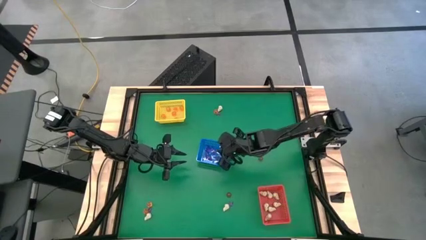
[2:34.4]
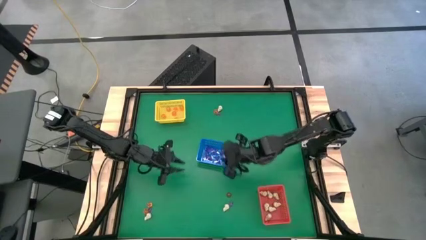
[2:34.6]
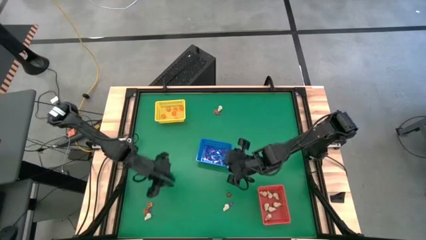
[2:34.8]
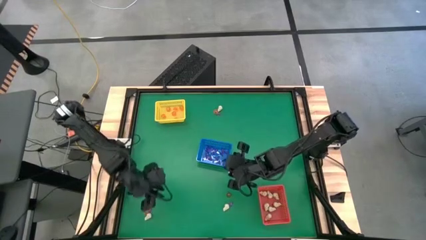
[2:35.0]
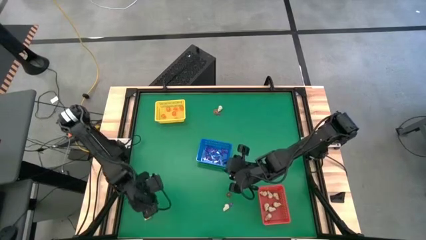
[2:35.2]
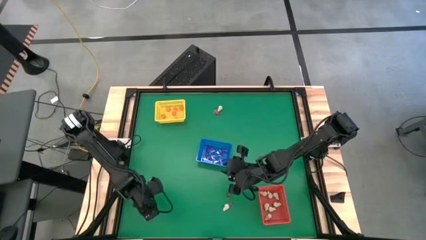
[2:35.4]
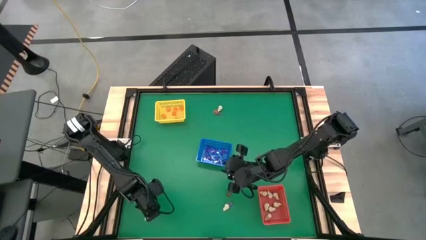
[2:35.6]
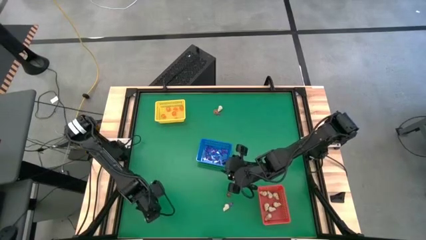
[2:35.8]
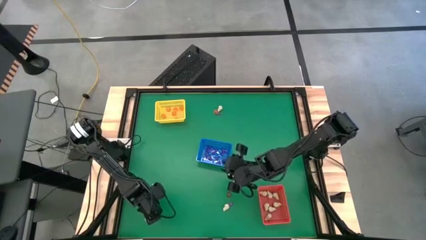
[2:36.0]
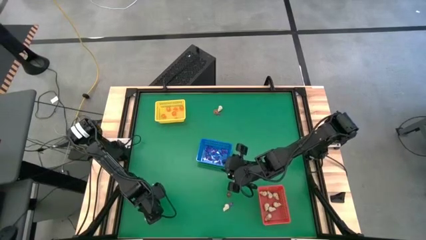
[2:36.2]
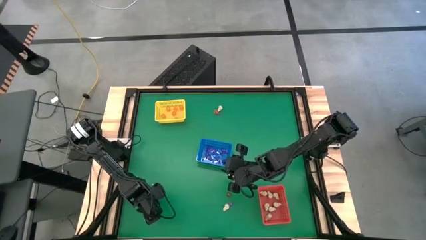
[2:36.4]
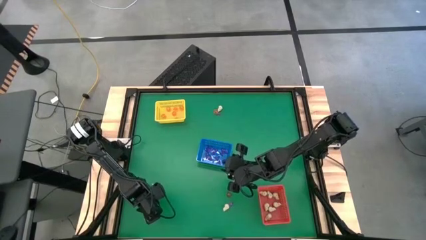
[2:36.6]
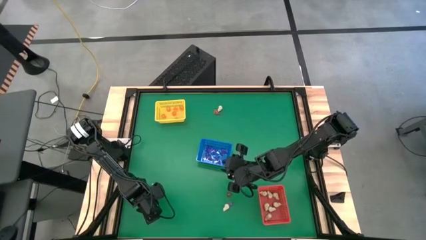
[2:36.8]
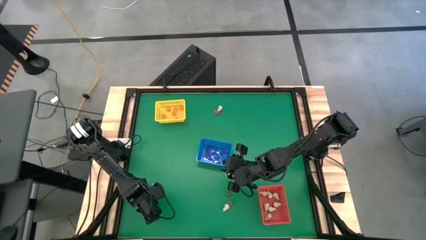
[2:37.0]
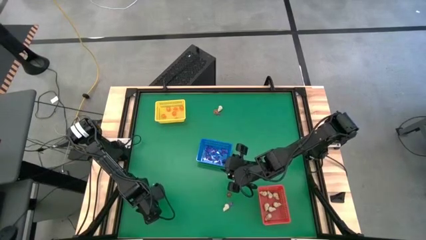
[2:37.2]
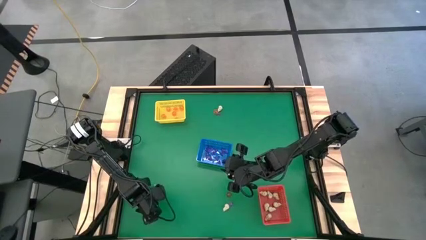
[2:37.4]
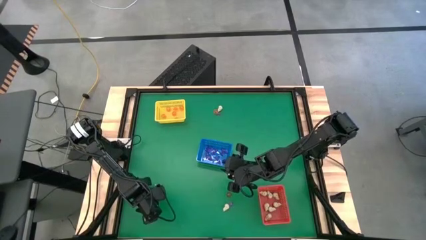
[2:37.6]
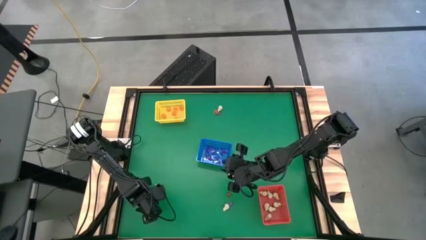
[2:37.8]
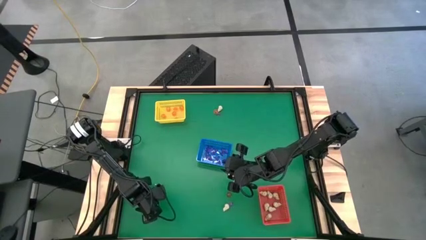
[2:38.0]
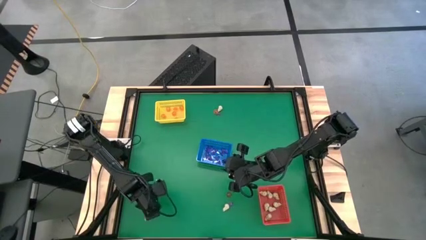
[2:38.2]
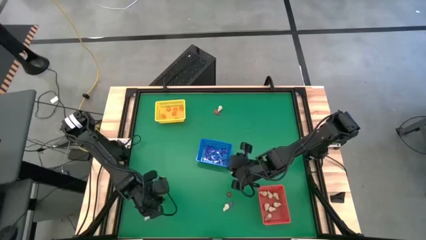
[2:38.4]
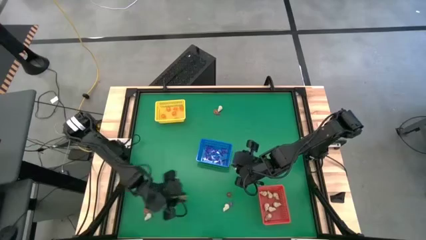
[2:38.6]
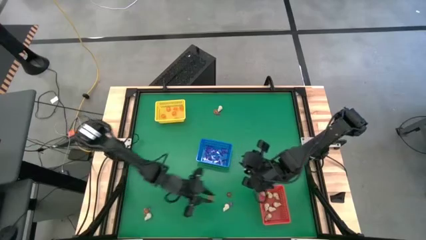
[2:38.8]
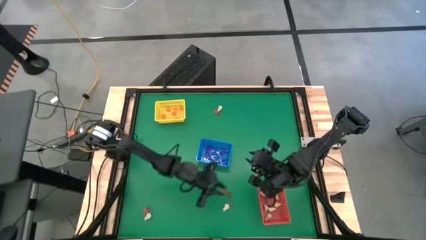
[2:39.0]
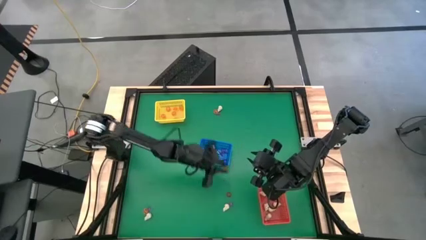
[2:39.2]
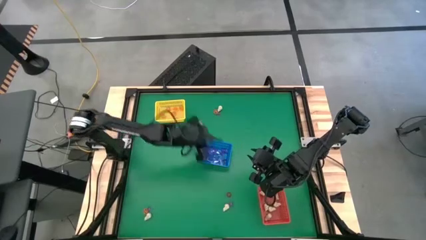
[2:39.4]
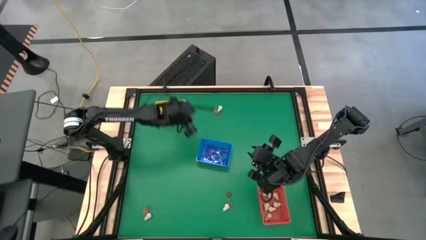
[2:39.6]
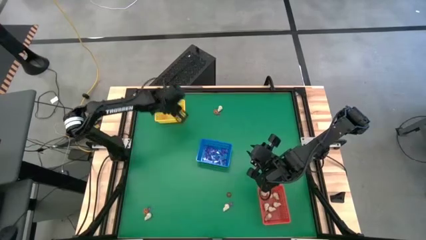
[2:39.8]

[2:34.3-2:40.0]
Task: Sort Halloween decoration
Put the pumpkin toy into the yellow bin

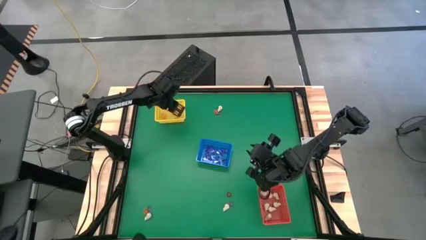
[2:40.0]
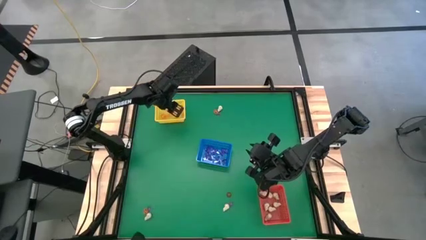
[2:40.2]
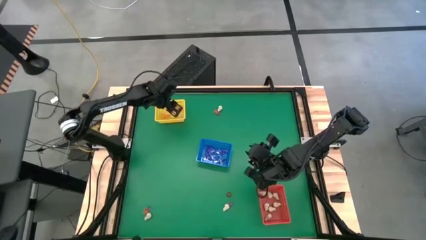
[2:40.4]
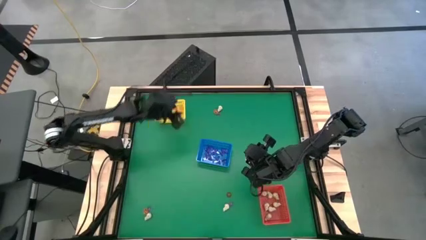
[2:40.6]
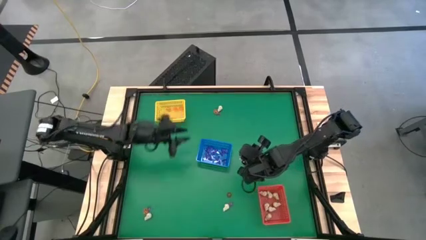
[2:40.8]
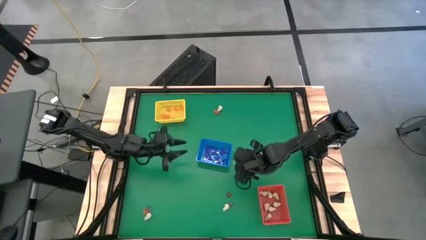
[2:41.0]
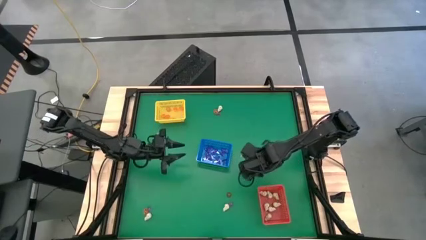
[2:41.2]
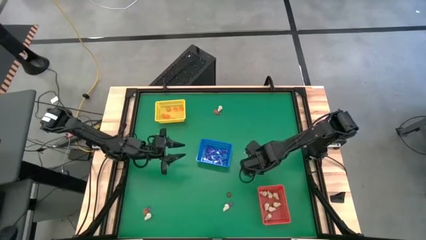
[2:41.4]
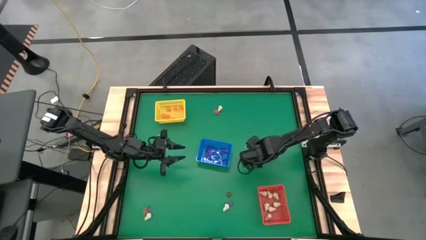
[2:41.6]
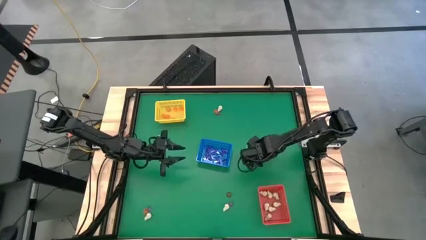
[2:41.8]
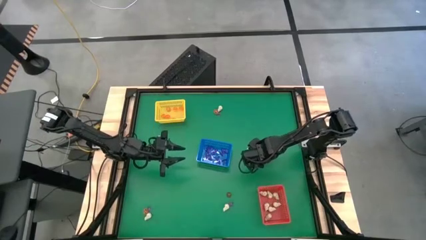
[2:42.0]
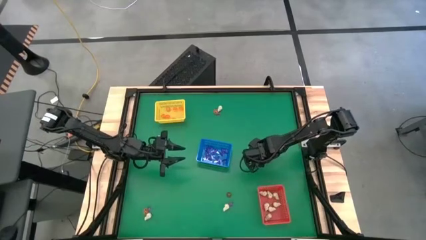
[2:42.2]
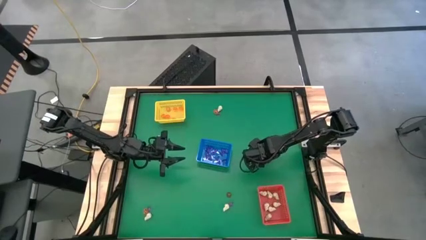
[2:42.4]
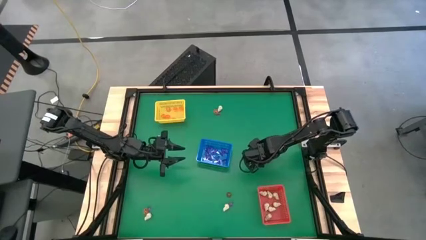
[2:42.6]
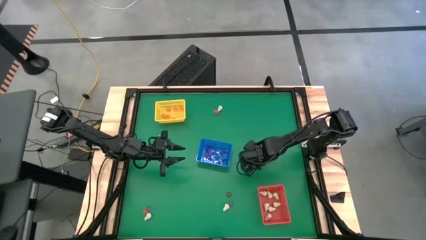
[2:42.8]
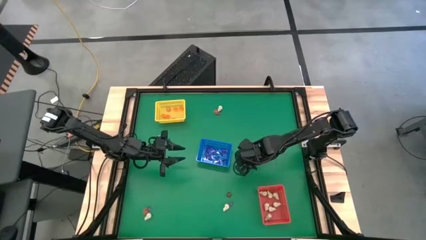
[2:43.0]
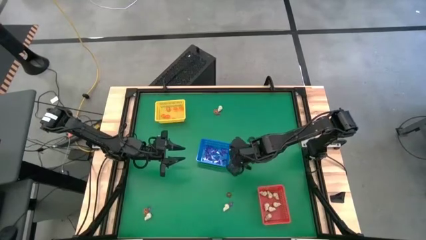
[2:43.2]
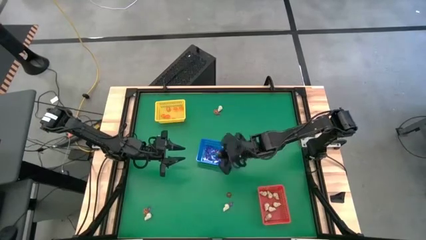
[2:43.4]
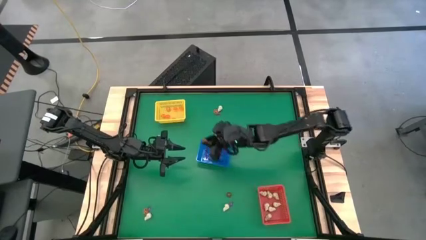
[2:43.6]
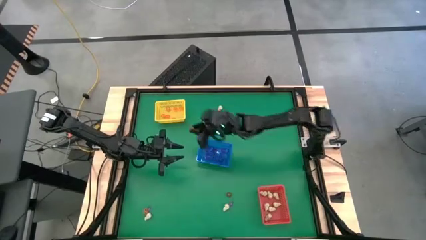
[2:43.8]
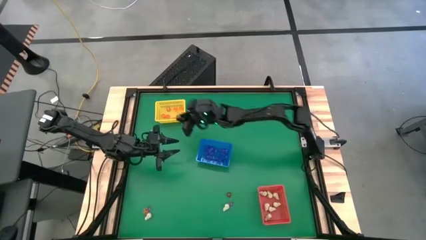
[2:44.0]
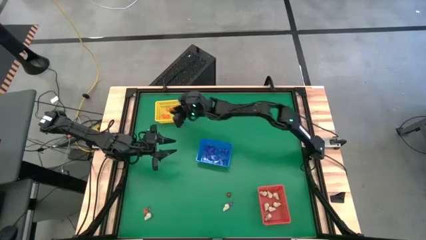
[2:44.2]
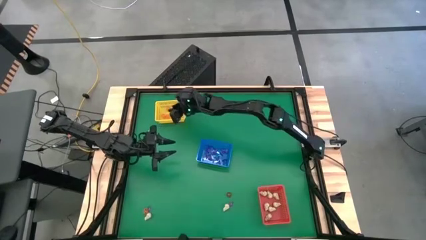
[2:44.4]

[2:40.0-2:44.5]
Put the pumpkin toy into the yellow bin

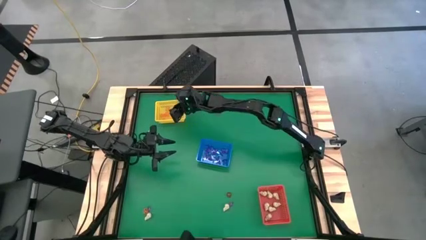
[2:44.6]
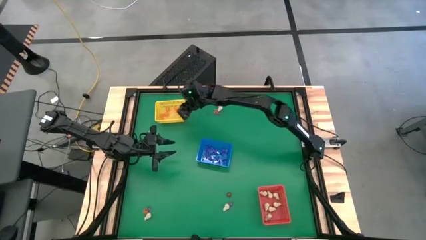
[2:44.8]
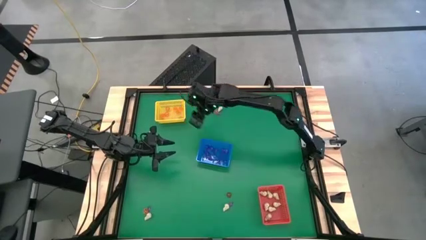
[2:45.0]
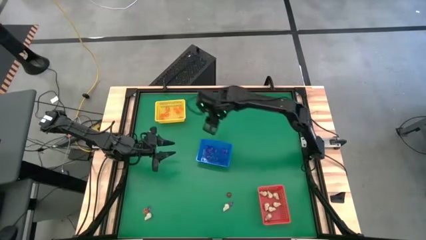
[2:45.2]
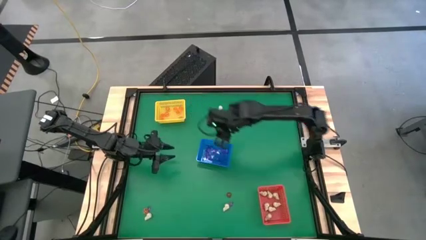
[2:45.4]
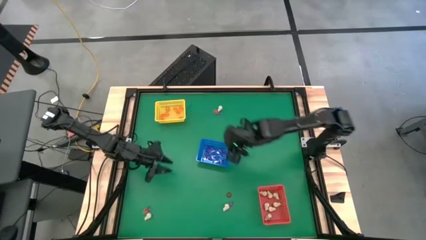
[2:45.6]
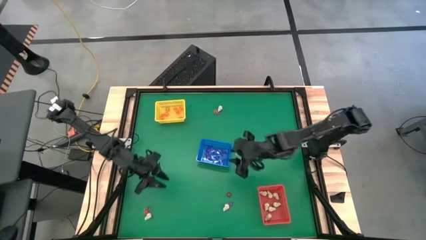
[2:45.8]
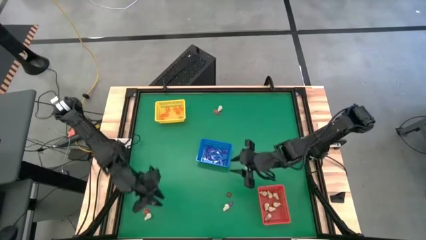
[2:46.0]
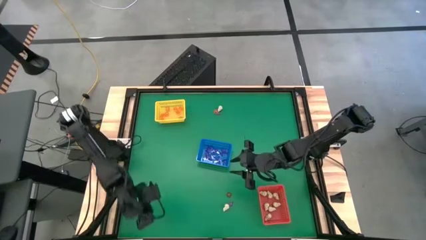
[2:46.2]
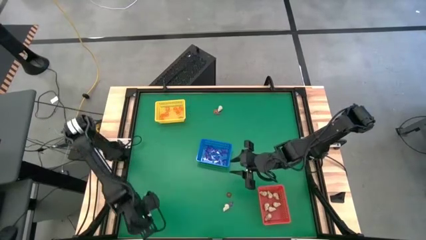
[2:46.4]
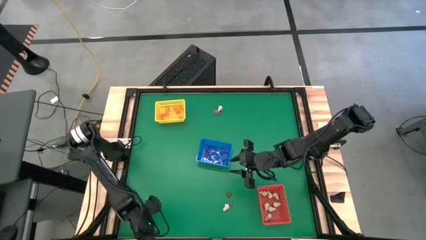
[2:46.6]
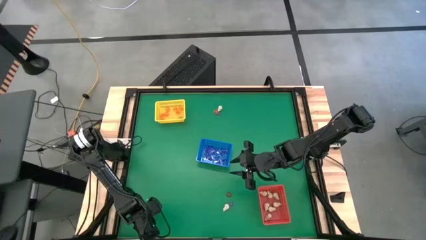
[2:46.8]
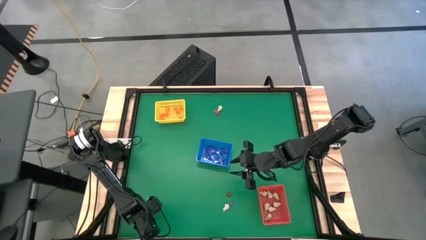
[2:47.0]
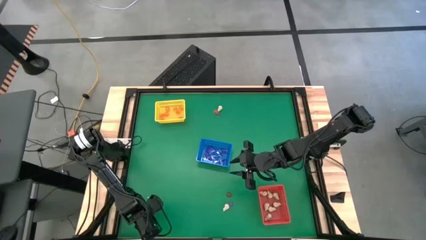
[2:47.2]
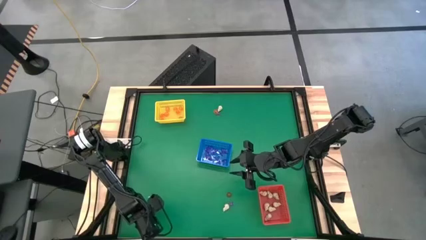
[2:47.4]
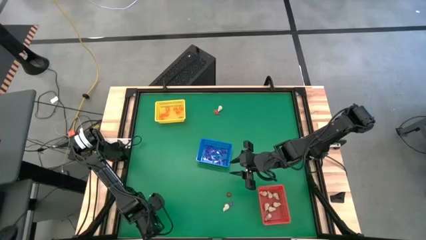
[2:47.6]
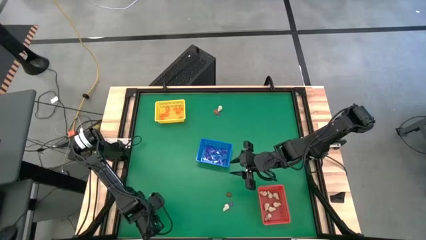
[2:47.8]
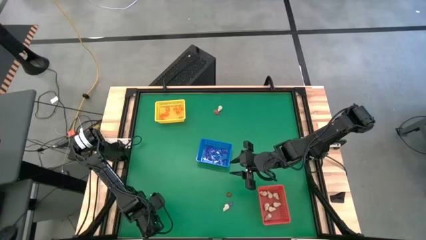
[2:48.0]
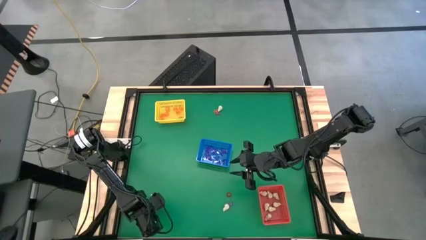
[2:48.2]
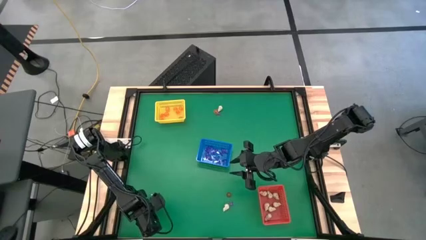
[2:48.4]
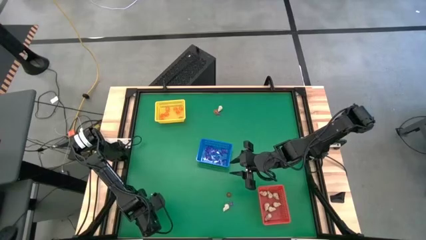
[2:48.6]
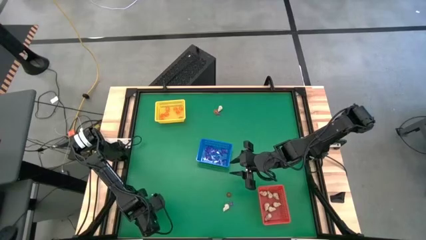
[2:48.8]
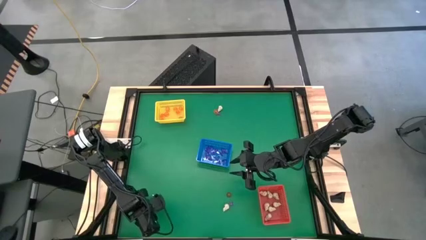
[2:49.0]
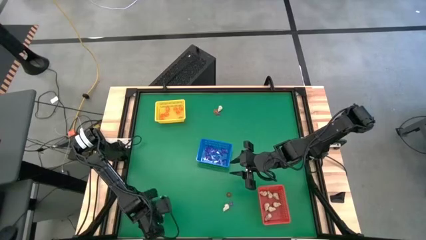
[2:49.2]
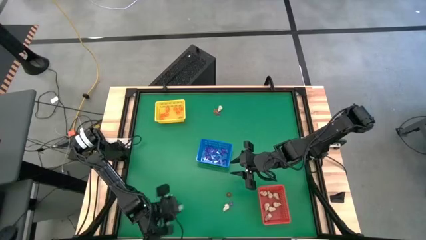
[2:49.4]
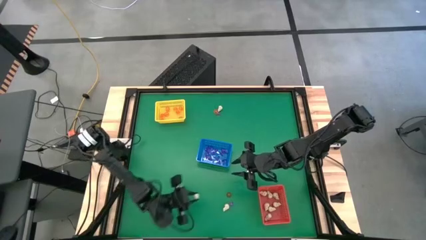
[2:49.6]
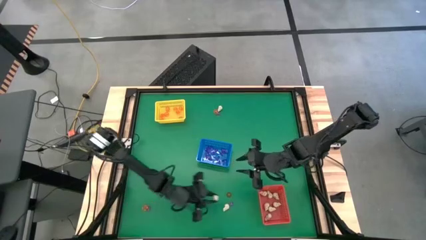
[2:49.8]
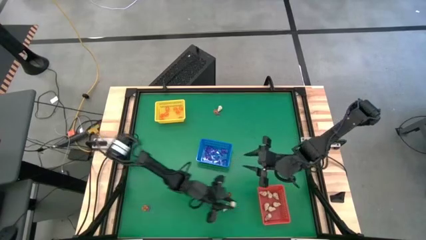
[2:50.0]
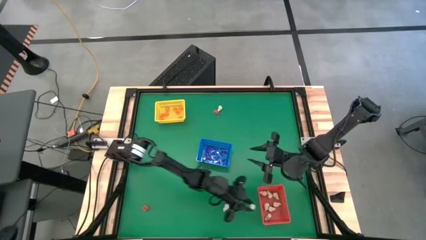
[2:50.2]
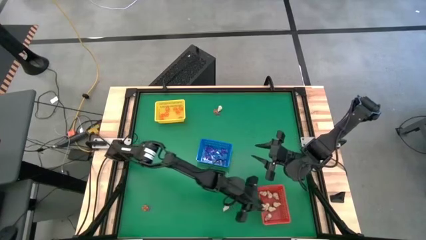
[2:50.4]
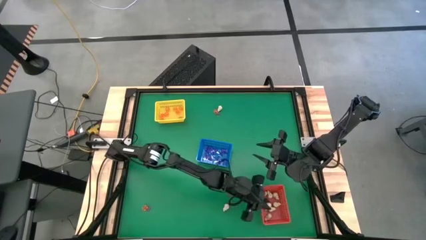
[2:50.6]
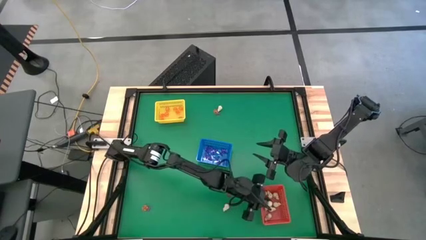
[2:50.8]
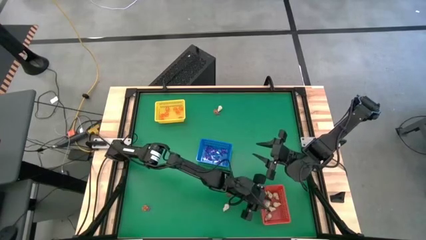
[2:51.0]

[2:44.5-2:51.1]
Put the skull toy into the red bin

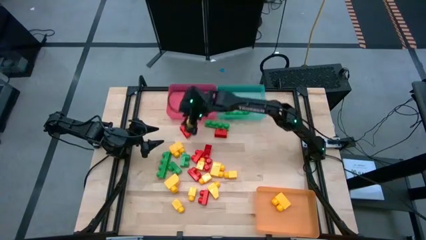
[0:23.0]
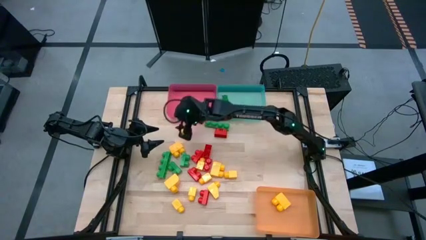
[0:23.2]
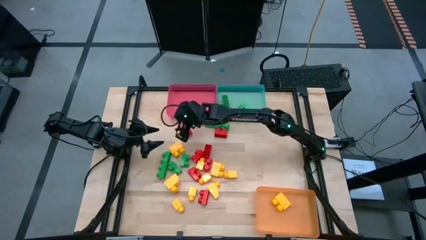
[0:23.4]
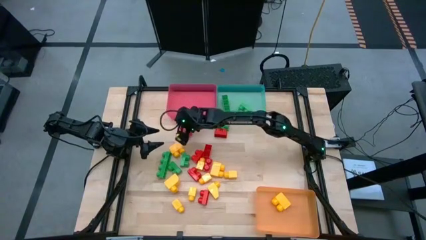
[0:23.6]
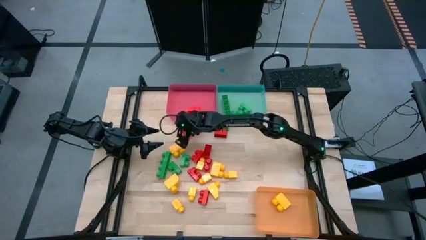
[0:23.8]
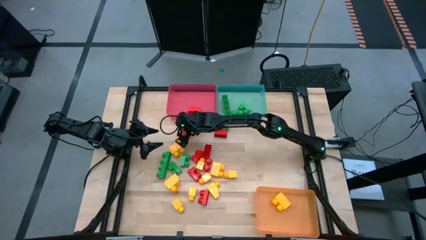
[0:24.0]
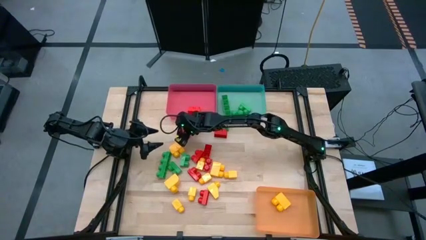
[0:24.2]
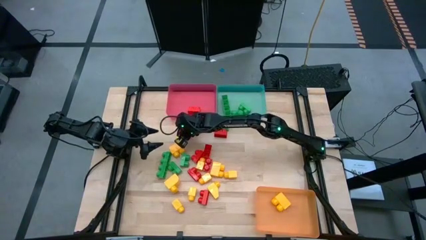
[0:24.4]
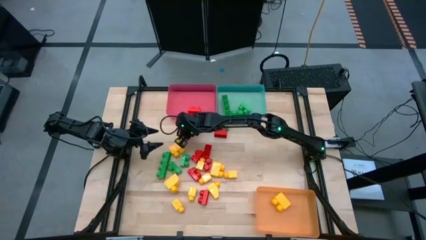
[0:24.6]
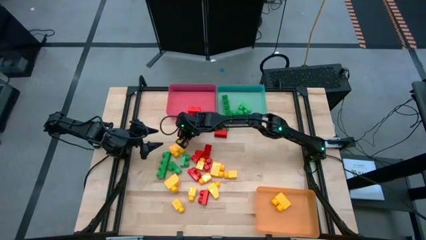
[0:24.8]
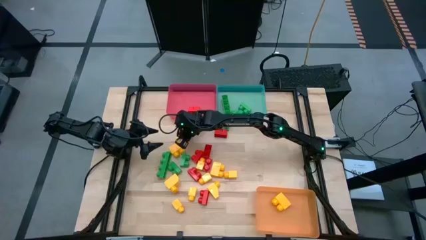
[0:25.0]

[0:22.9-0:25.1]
Task: Sort blocks
Put the red game piece into the red bin
